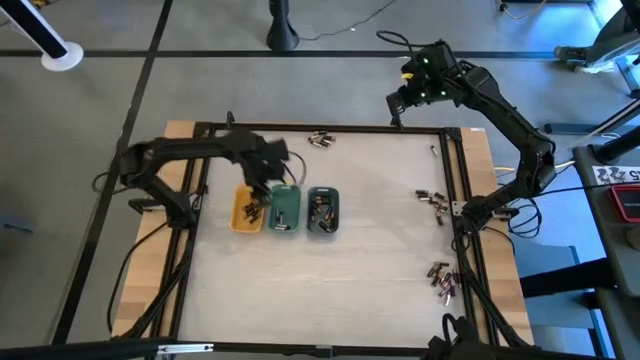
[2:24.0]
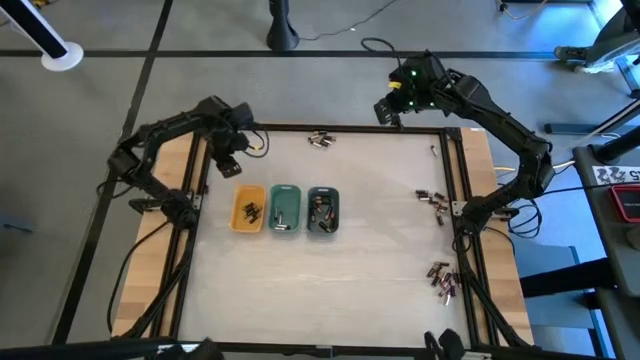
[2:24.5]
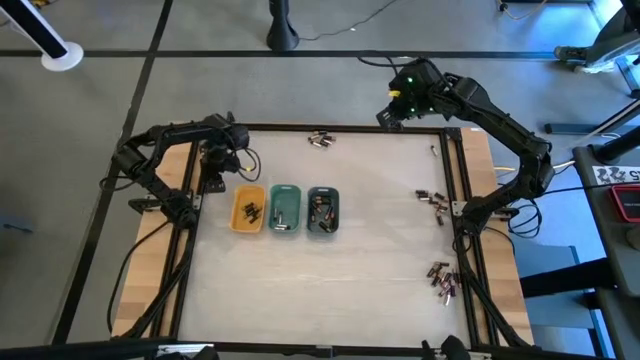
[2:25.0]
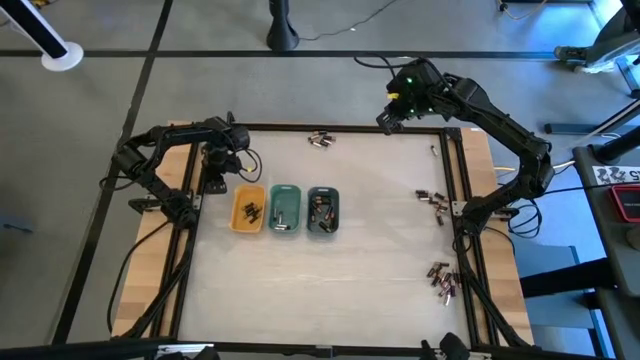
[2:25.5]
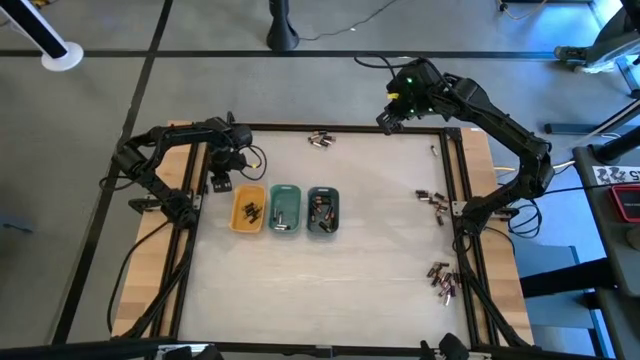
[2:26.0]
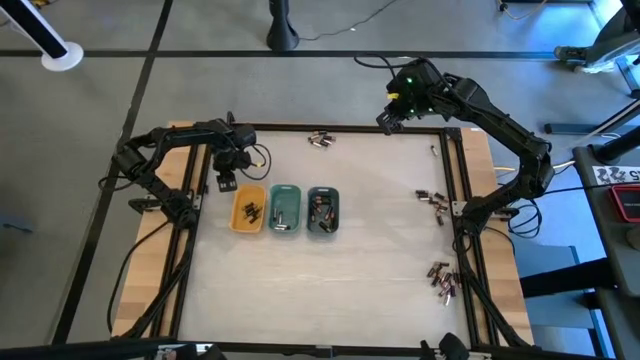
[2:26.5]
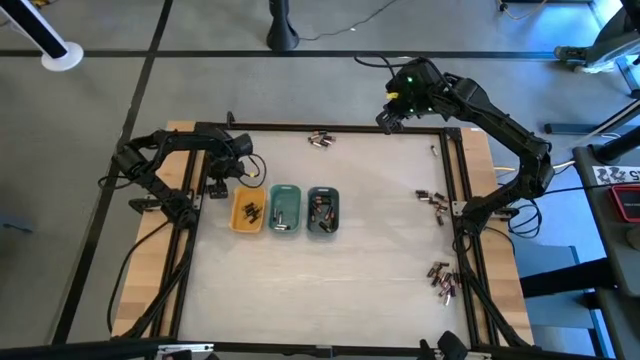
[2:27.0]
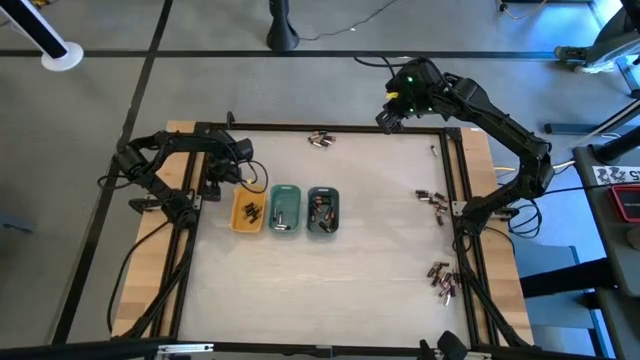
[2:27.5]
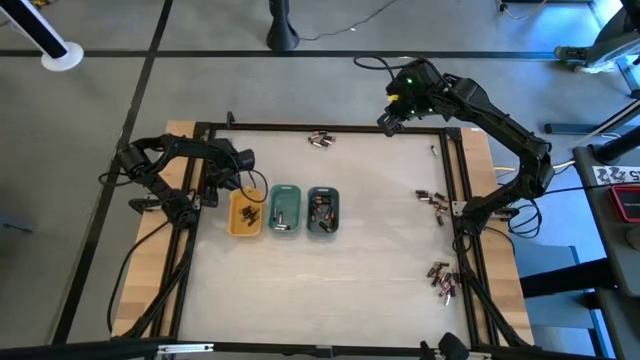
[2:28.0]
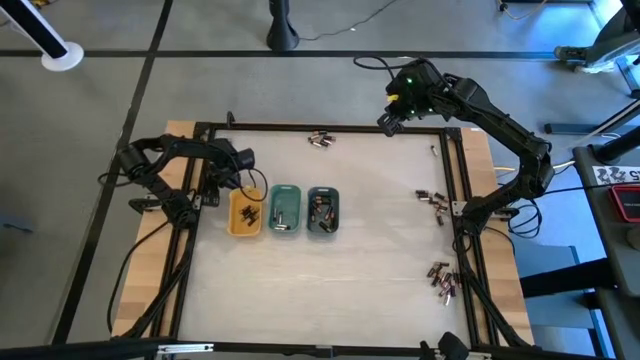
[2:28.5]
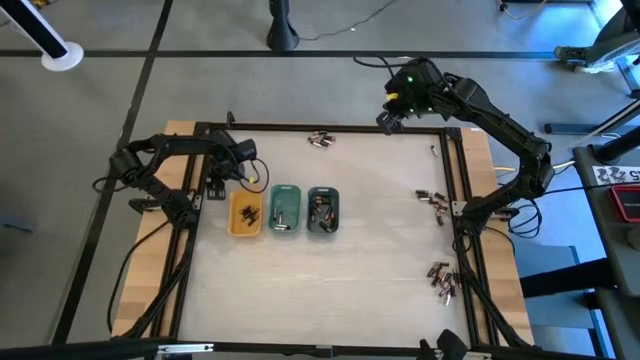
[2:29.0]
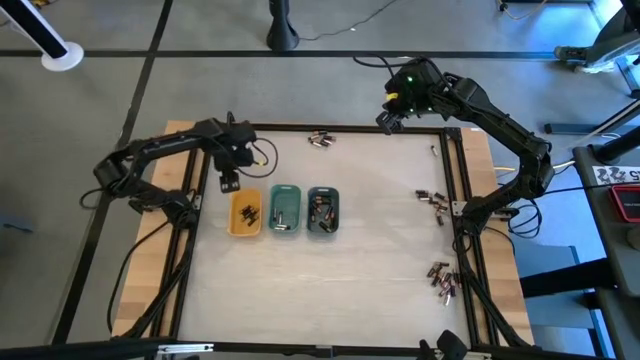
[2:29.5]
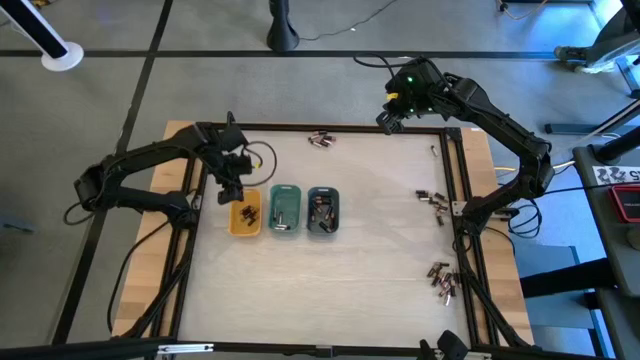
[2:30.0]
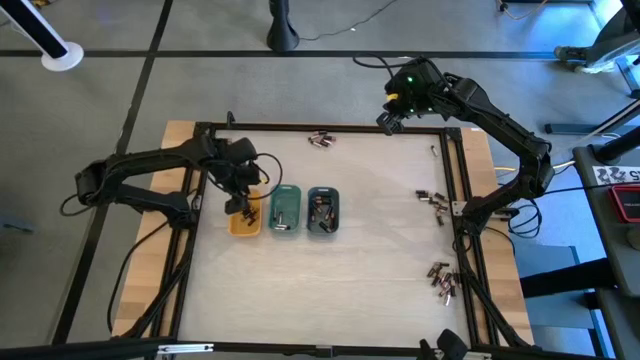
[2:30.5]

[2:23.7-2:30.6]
Task: Sort batteries
Put the small black battery into the yellow bin

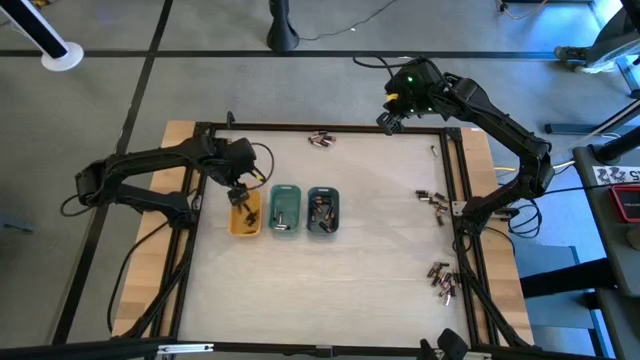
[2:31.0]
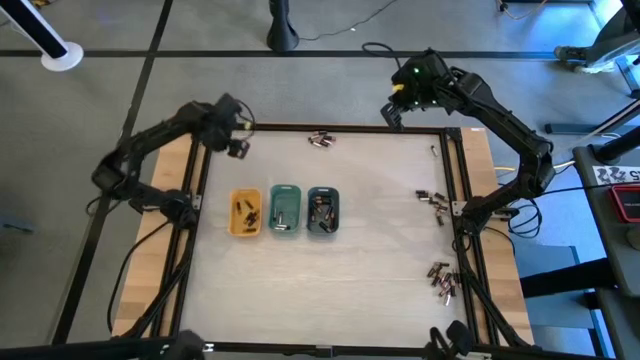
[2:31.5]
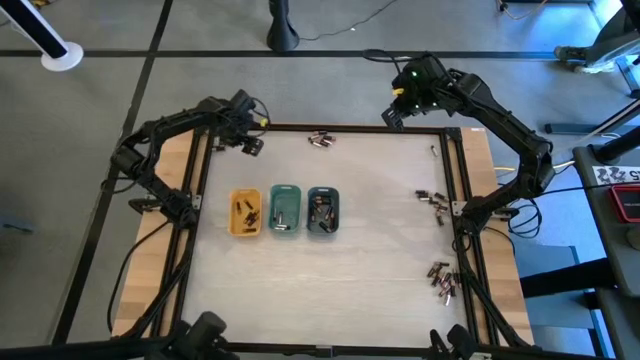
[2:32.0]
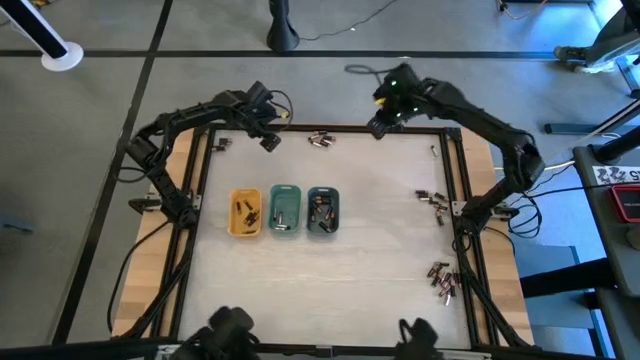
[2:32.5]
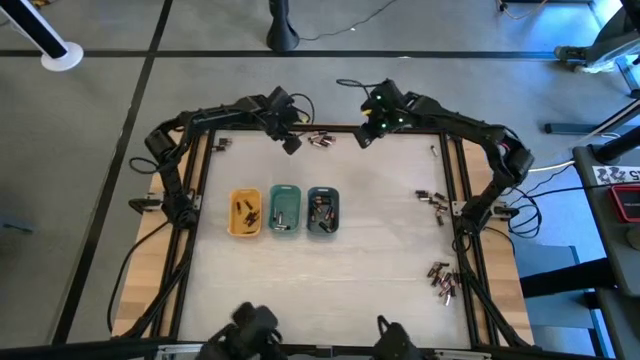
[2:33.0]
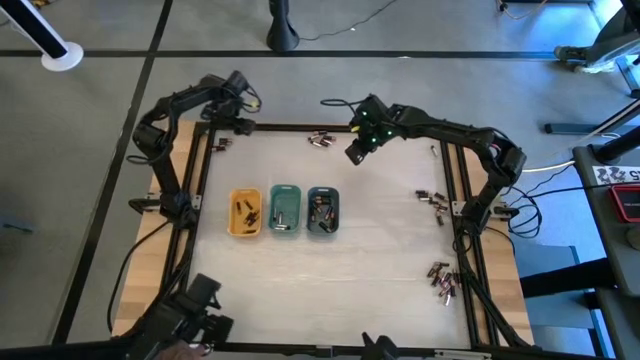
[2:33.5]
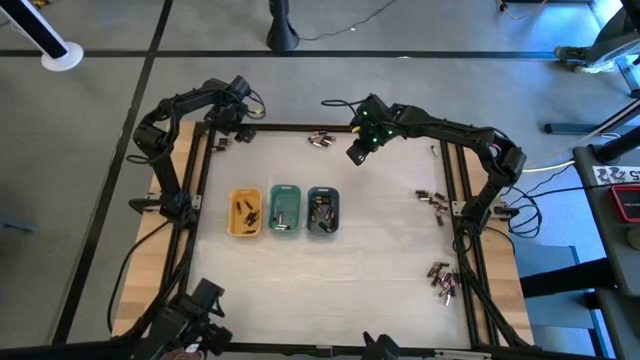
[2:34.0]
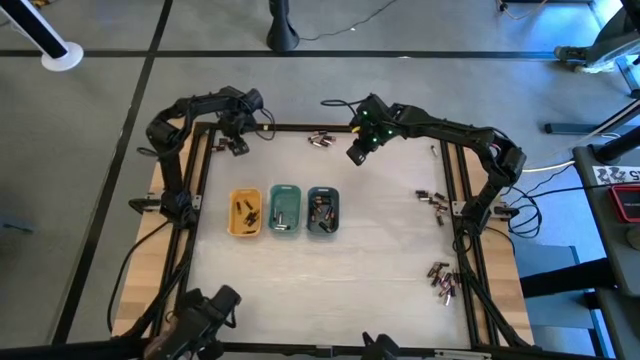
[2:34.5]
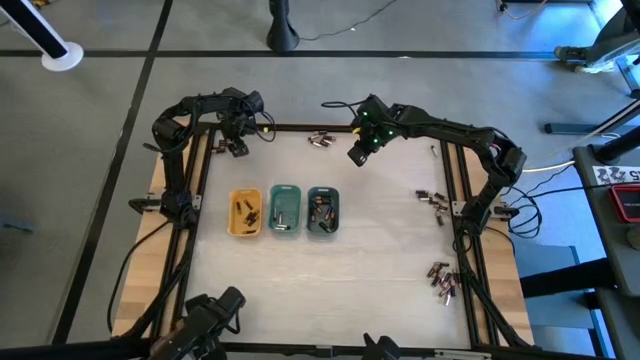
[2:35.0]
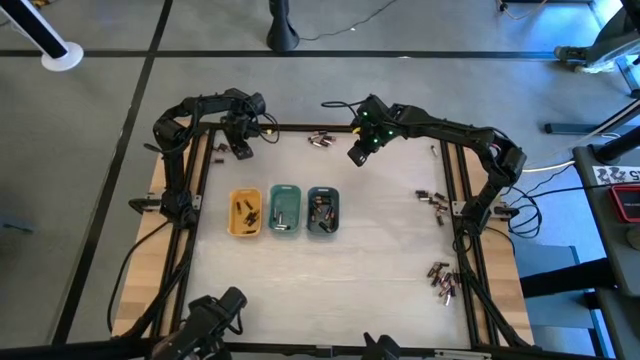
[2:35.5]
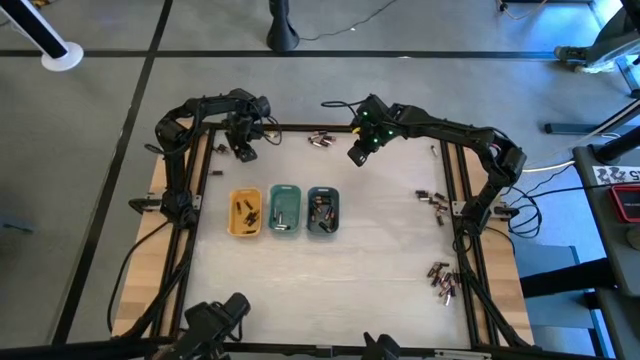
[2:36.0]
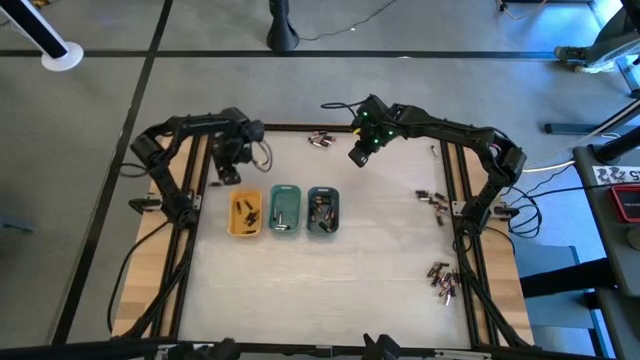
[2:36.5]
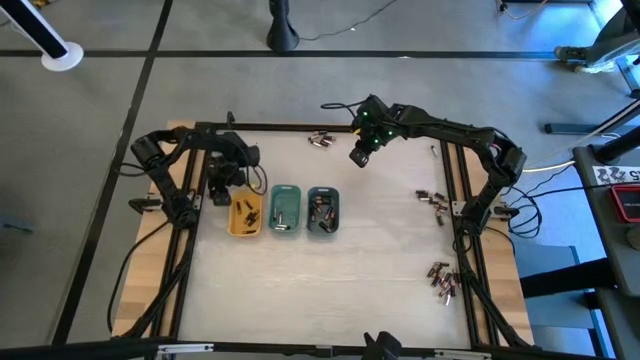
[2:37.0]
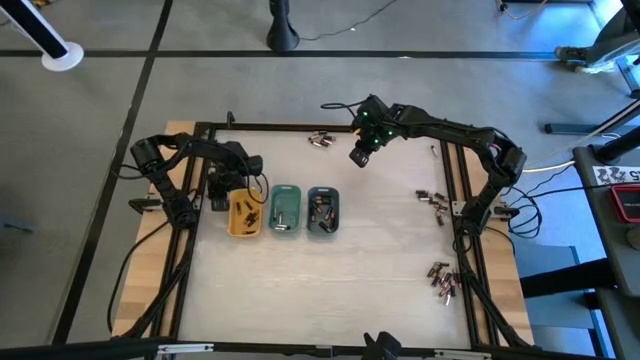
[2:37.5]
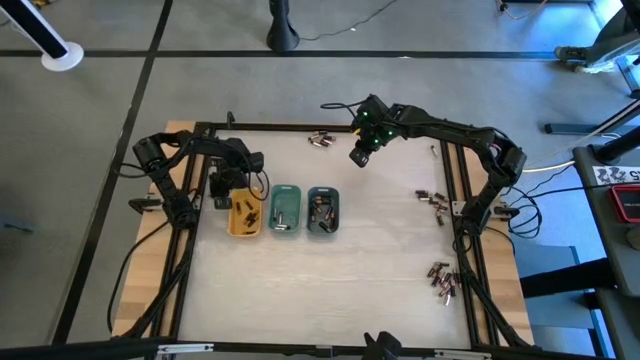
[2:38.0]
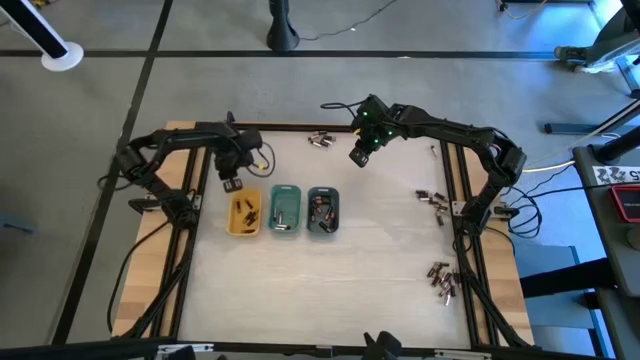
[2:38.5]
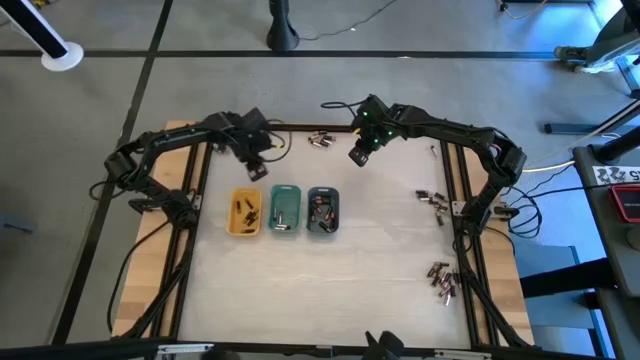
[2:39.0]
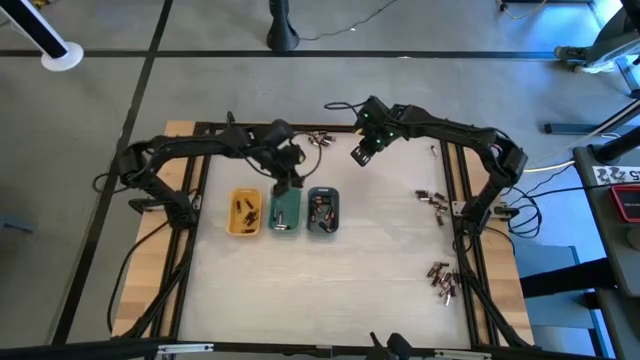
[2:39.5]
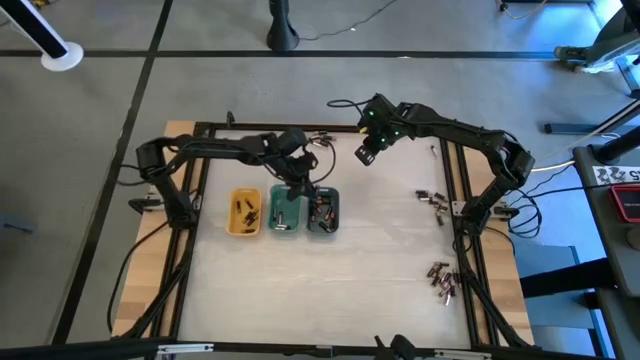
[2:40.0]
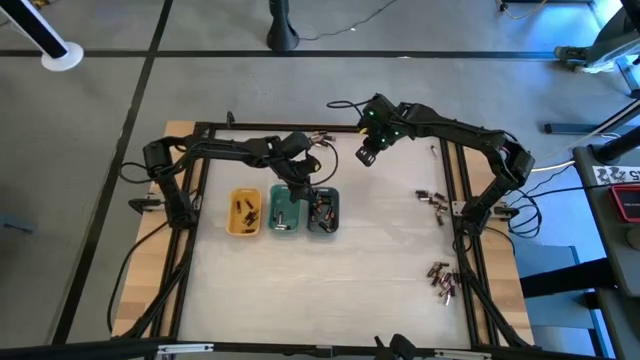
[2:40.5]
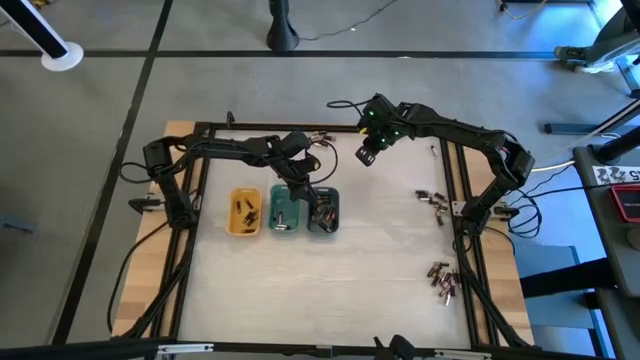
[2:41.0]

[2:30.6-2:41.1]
Put the large black battery into the blue bin

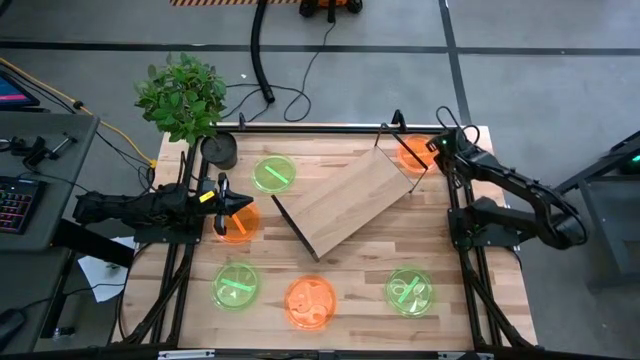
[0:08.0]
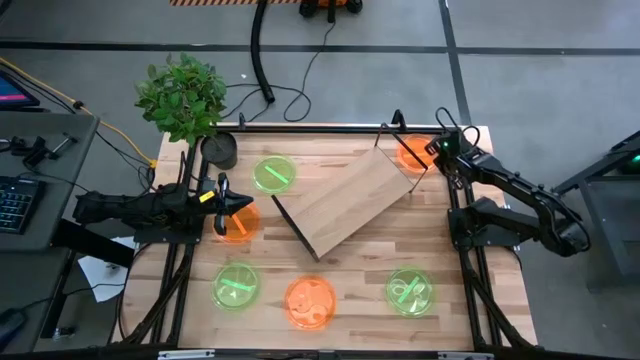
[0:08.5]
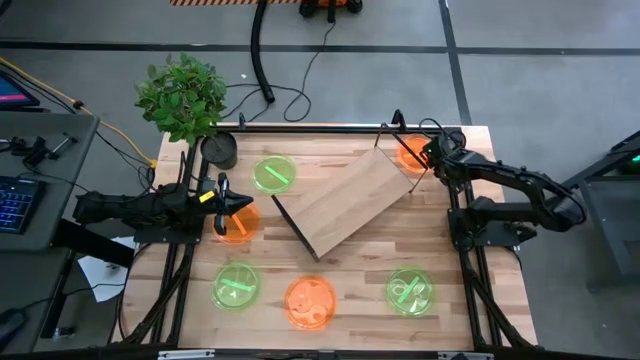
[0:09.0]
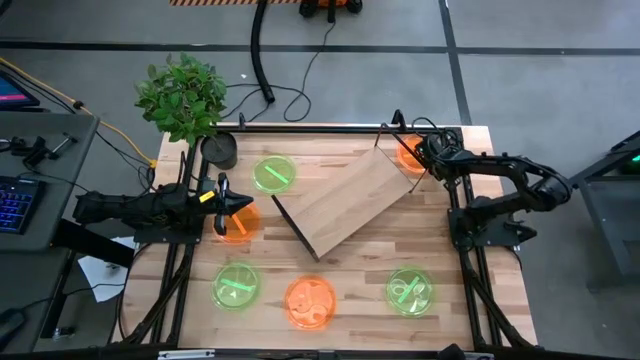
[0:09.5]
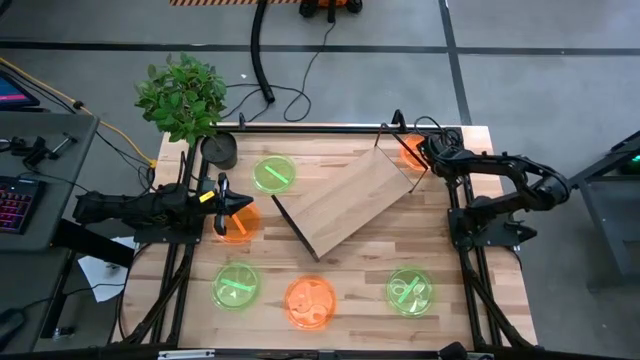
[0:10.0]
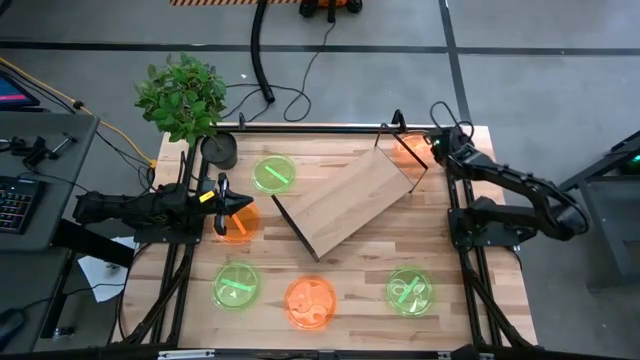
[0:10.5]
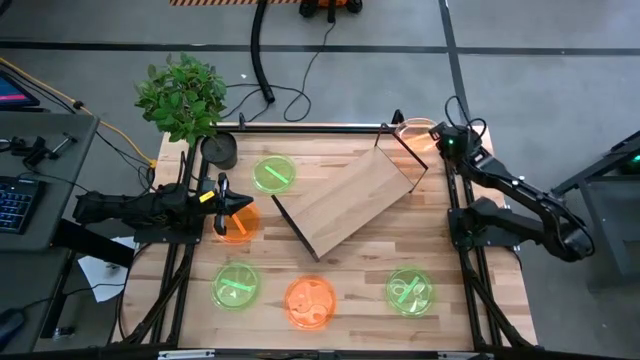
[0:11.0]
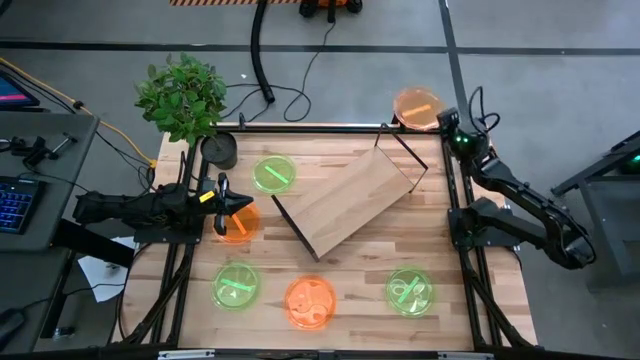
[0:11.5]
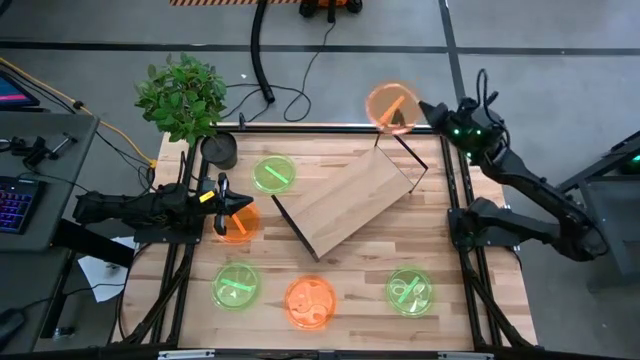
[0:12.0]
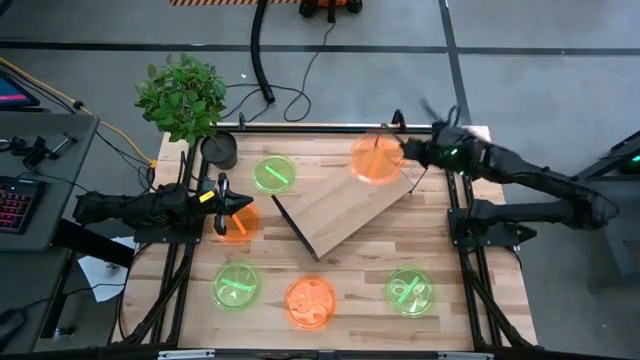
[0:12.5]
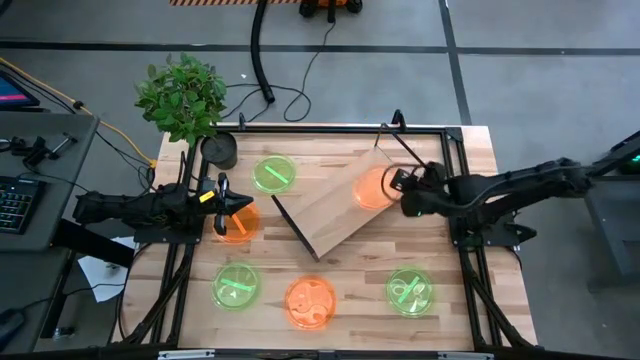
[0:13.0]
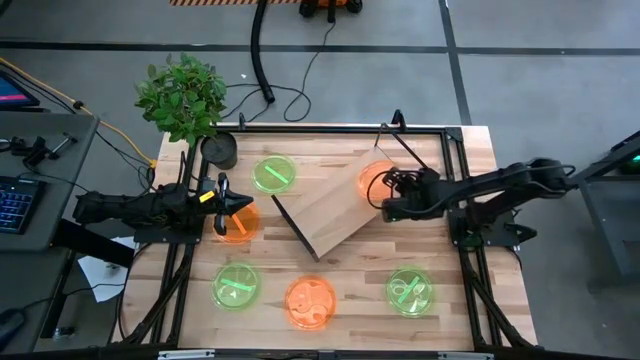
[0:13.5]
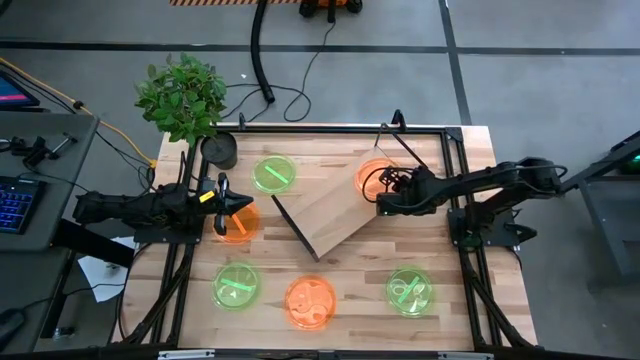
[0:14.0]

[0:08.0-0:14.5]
Task: Place and stack plates onto a shelf
Put the top right orange plate on the shelf
